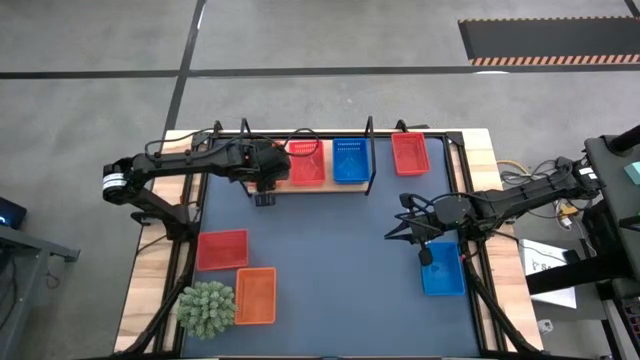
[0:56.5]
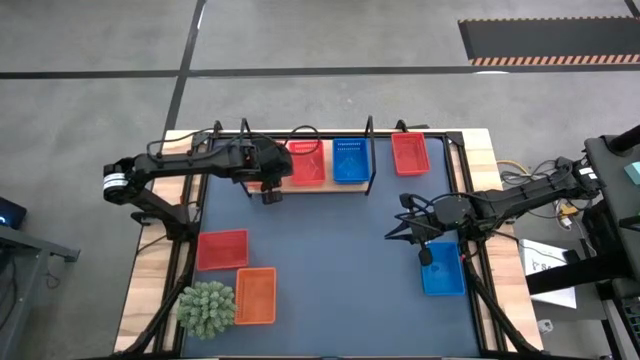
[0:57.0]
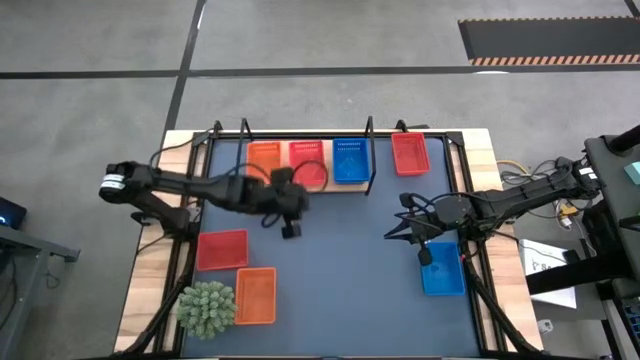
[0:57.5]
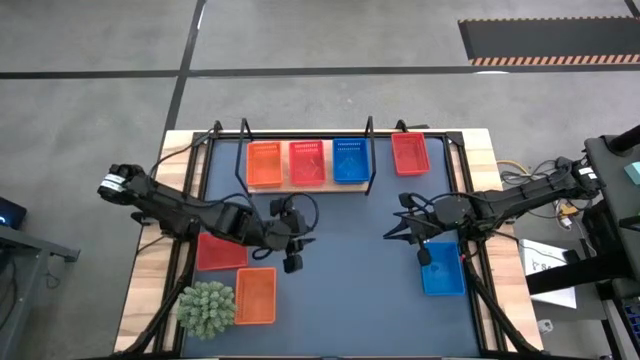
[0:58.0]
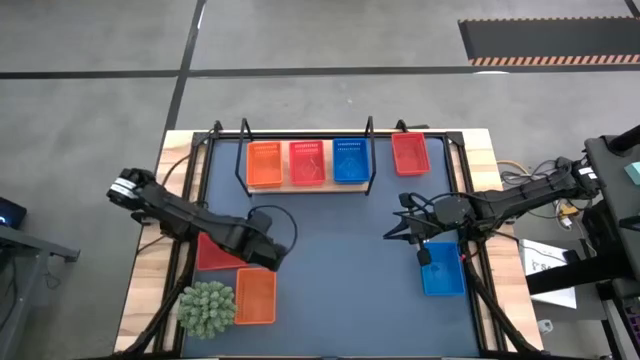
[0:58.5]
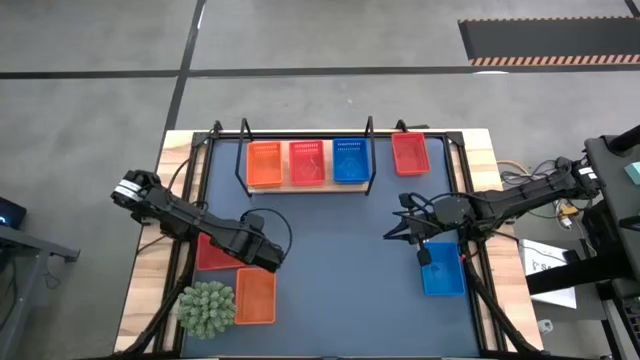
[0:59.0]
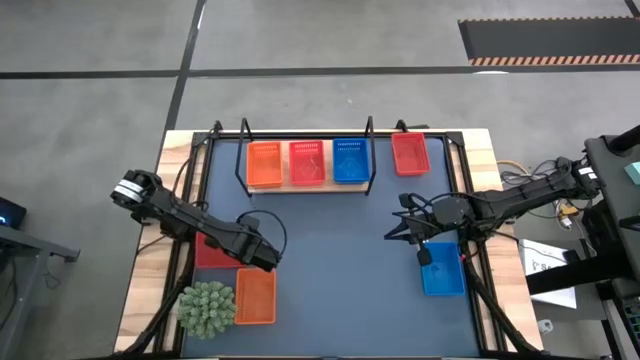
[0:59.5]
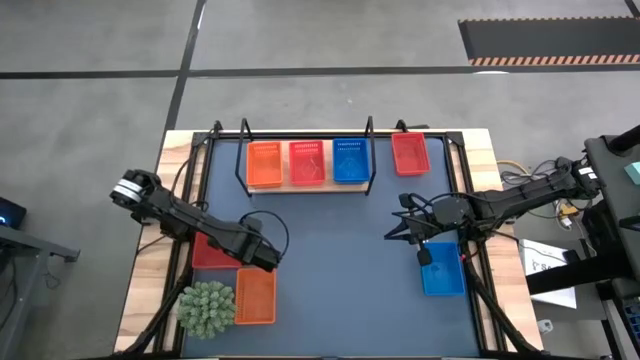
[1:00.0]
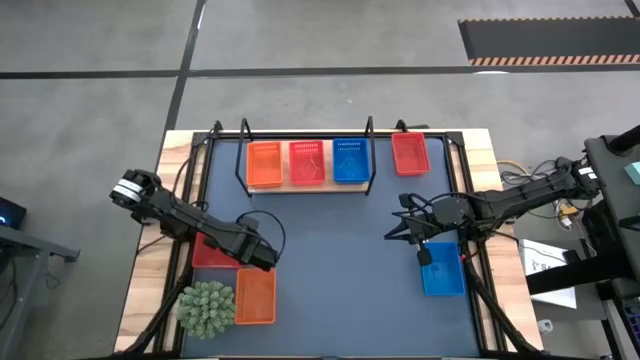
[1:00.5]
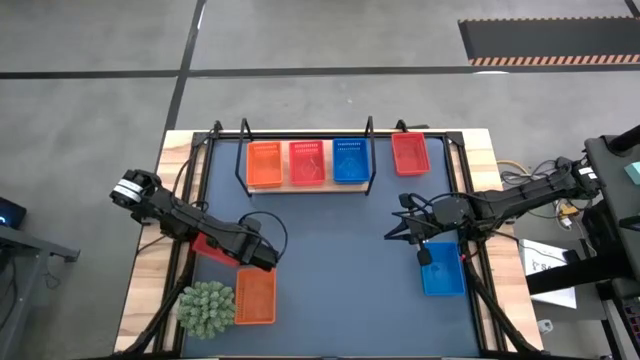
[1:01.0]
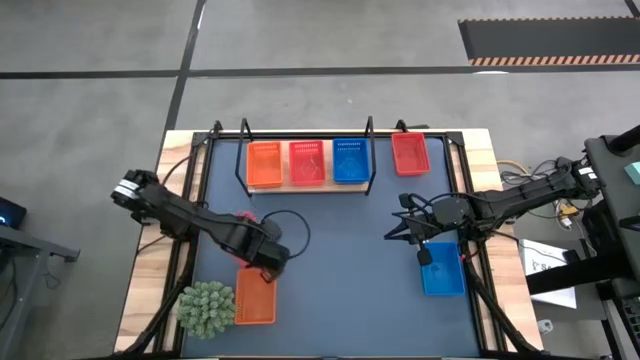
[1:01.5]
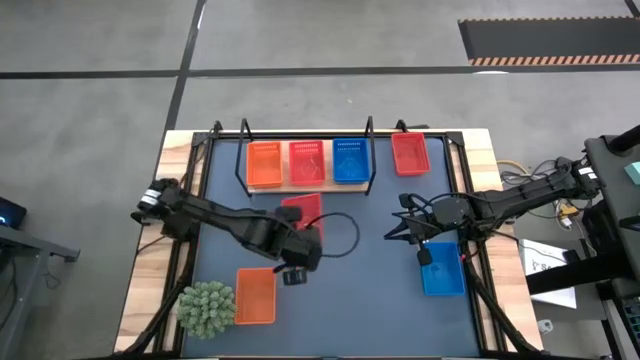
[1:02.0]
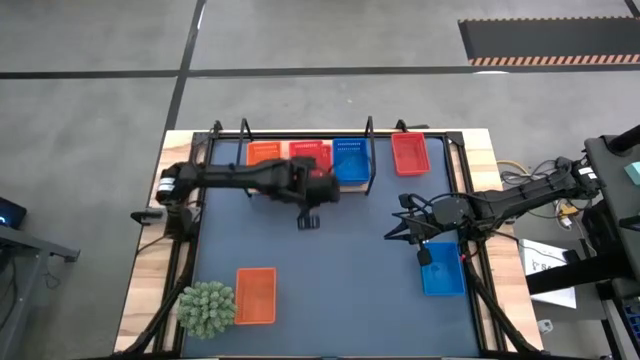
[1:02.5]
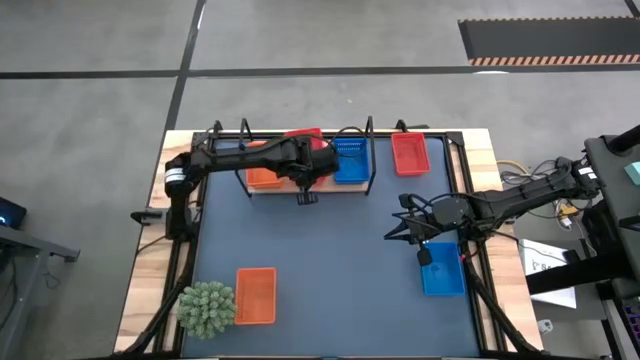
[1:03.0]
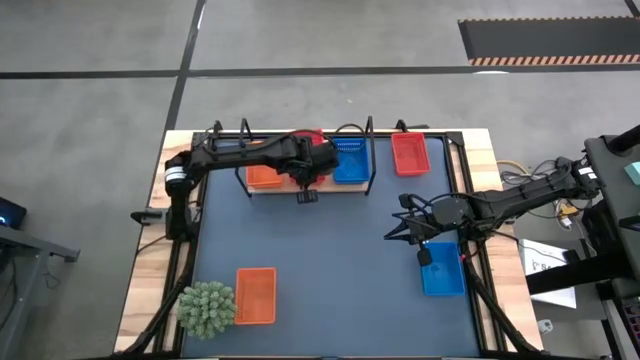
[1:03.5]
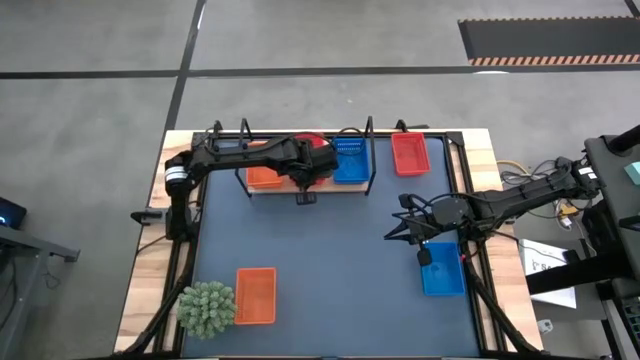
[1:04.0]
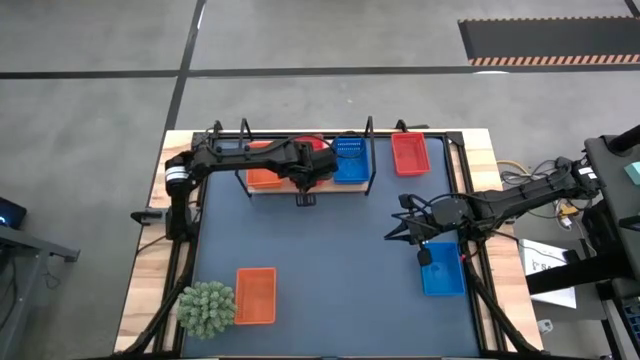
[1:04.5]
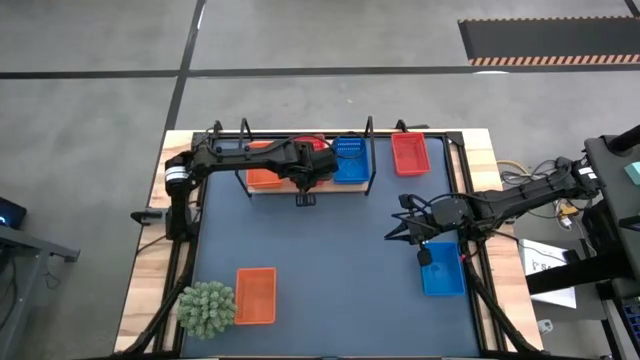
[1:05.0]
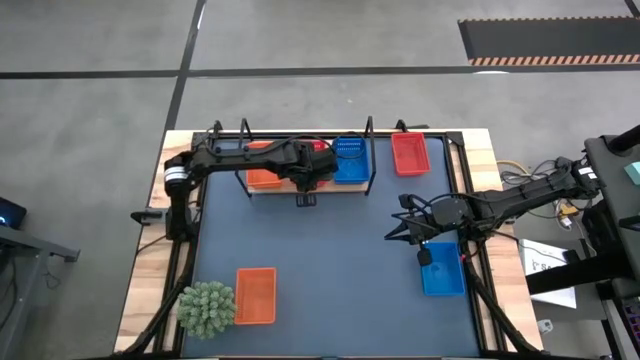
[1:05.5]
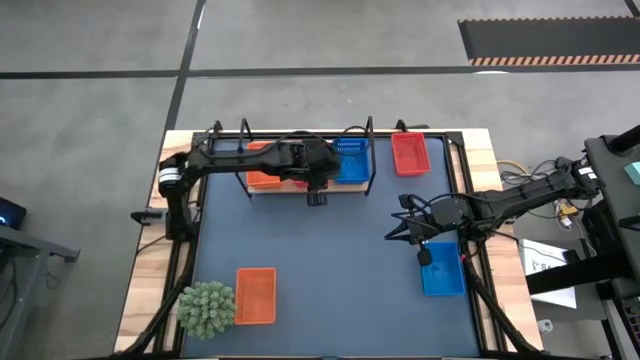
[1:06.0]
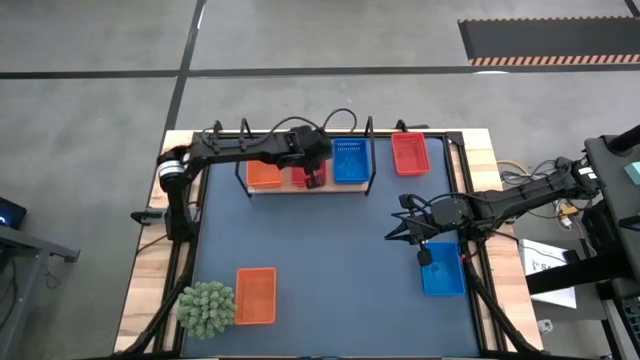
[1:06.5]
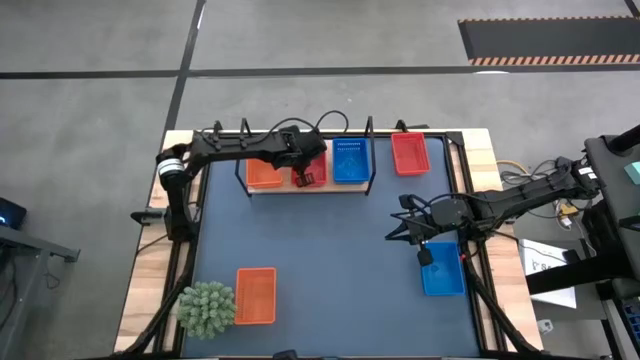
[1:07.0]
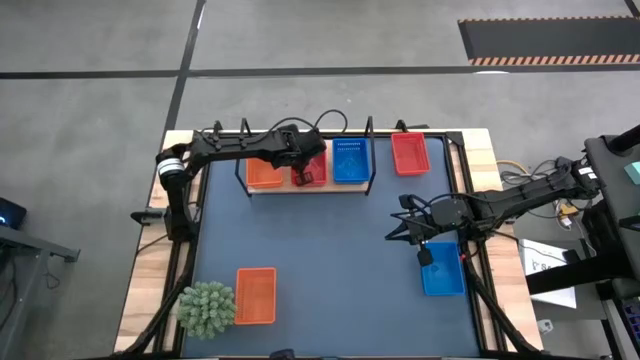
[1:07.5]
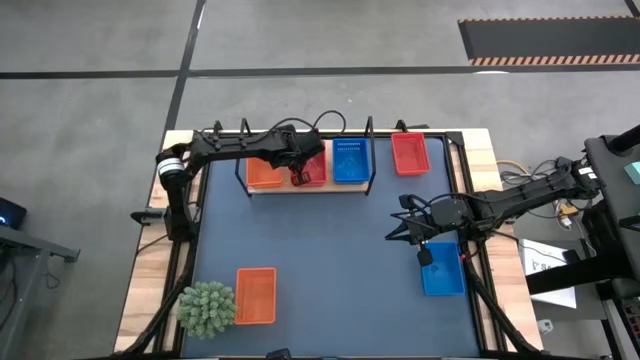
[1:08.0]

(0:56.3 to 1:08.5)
Task: Stack baskets on shelf by color
Stack the bottom red basket on top of the red basket on the shelf

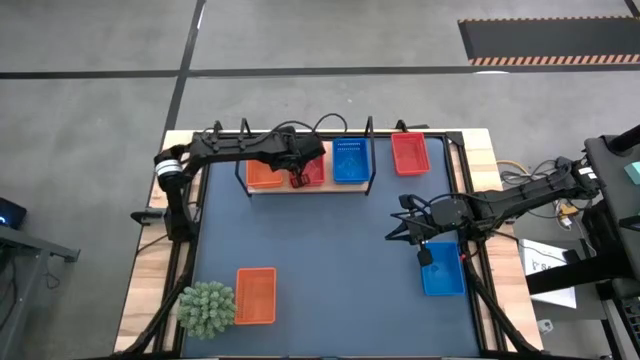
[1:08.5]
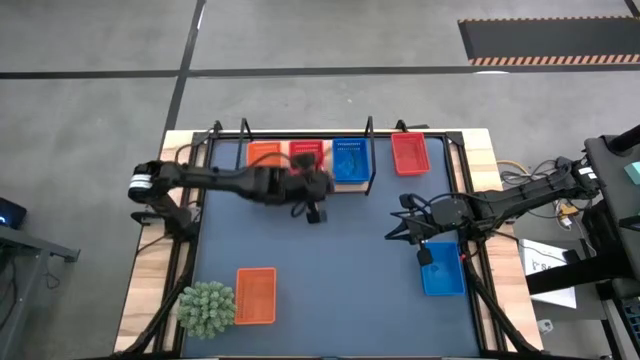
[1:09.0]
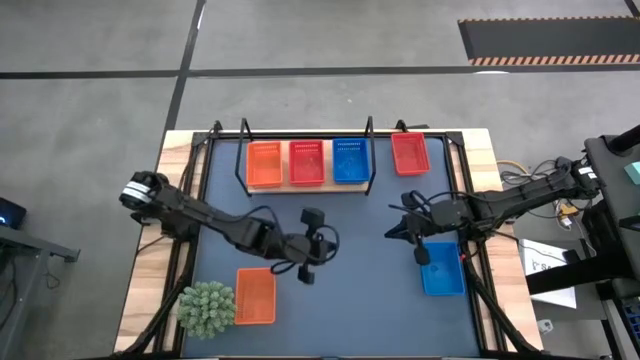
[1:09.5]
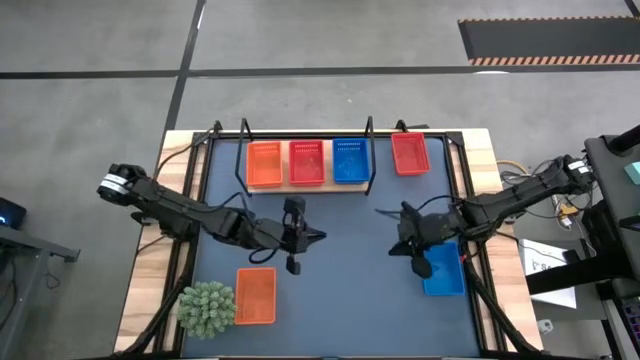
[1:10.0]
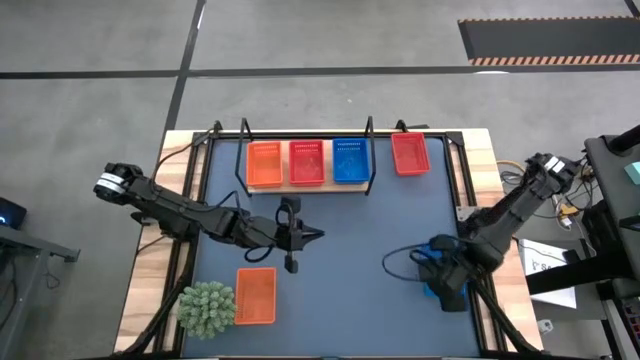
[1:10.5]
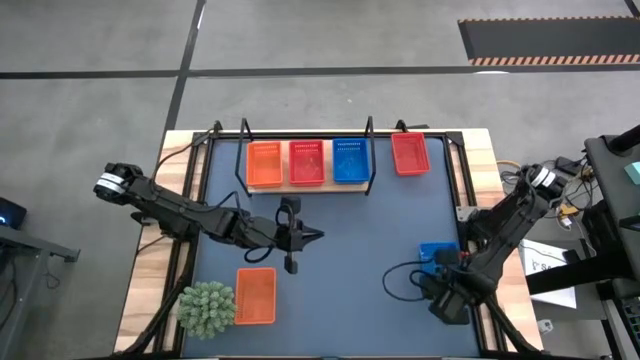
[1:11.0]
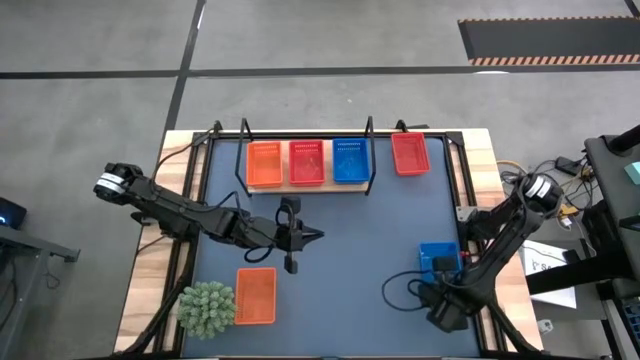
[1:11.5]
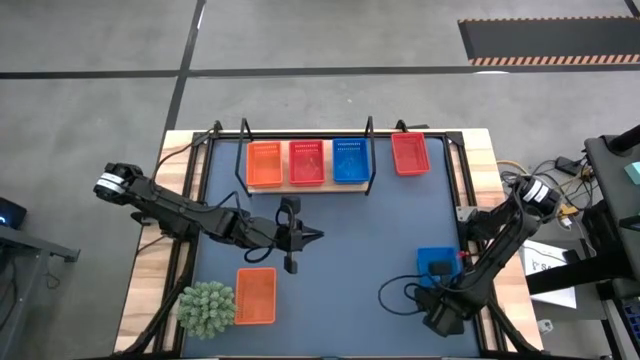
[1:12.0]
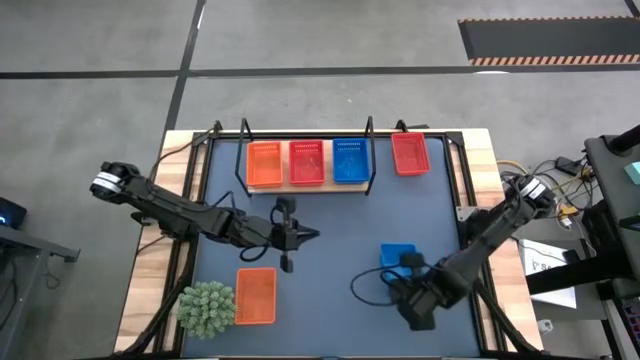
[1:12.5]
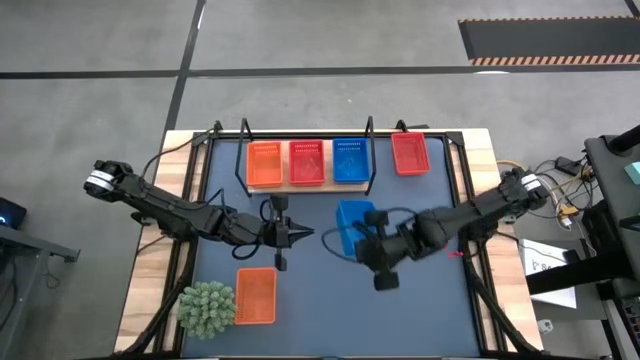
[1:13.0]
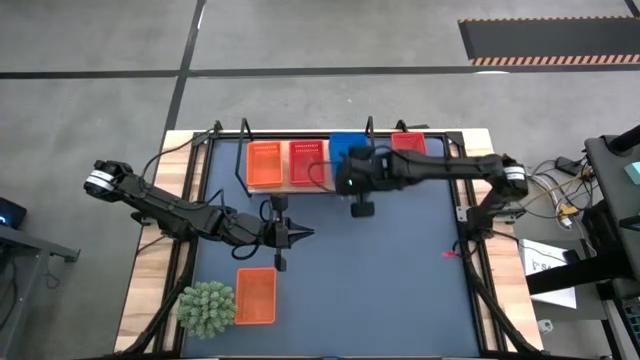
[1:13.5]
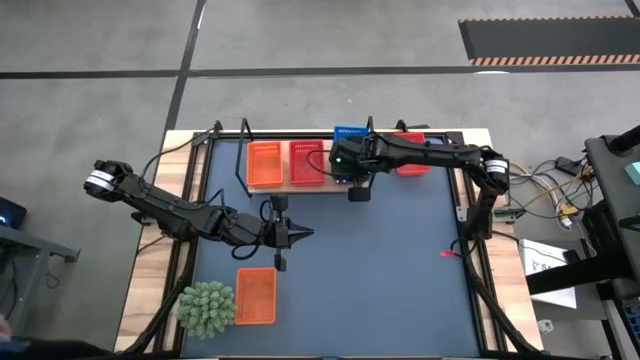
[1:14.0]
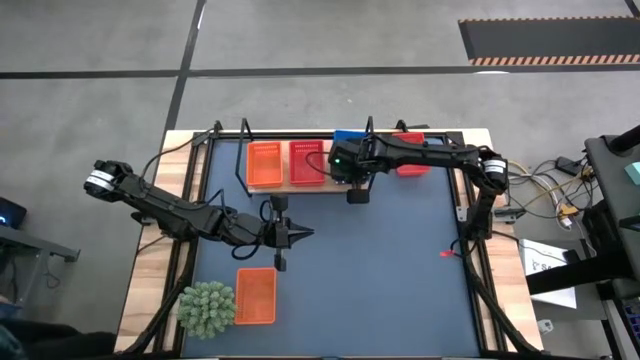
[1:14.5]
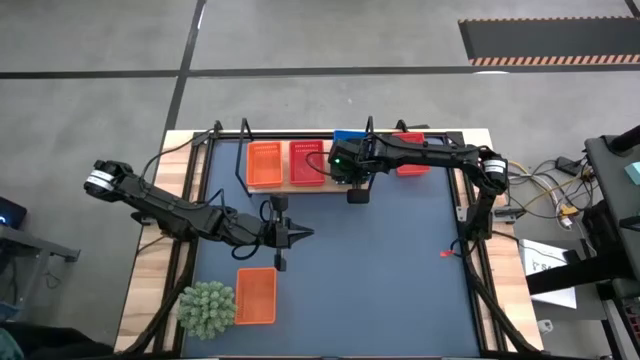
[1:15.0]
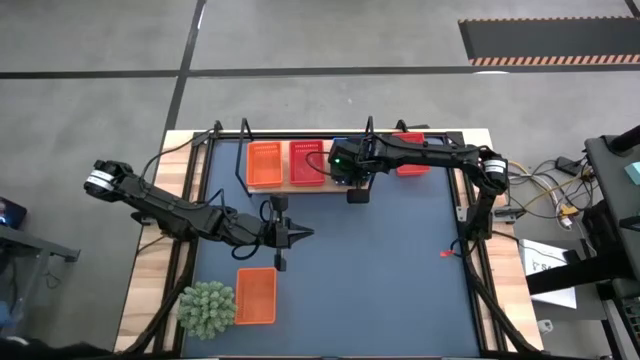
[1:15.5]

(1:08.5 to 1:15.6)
Stack the blue basket on top of the blue baskets on the shelf

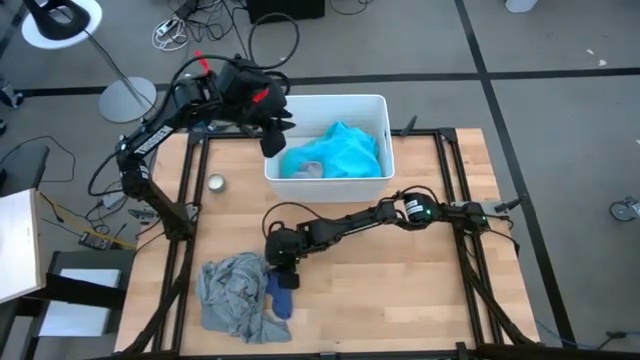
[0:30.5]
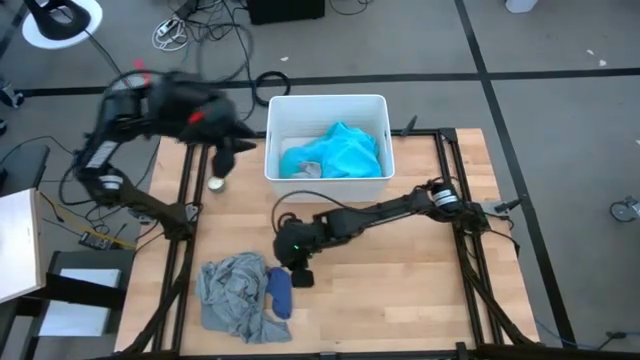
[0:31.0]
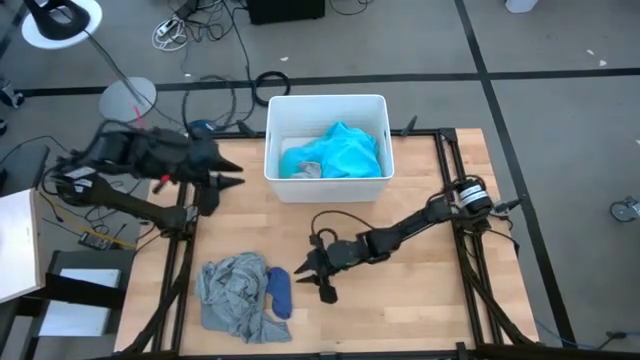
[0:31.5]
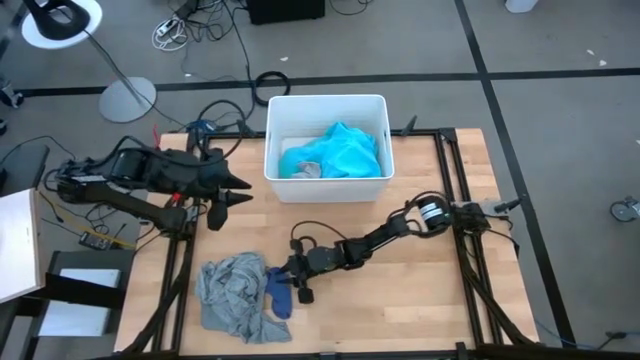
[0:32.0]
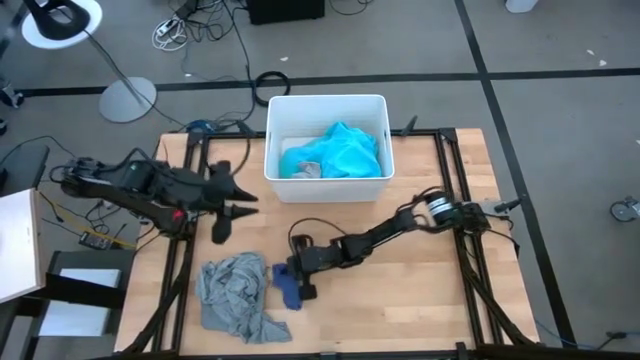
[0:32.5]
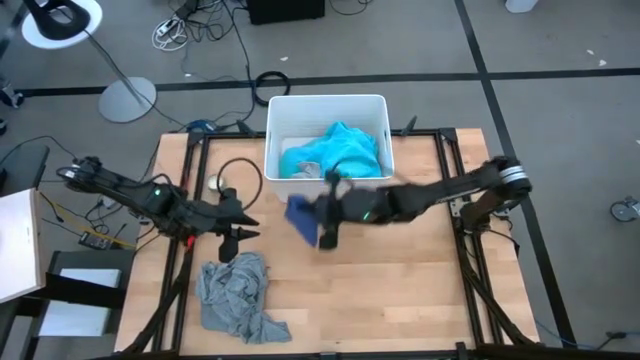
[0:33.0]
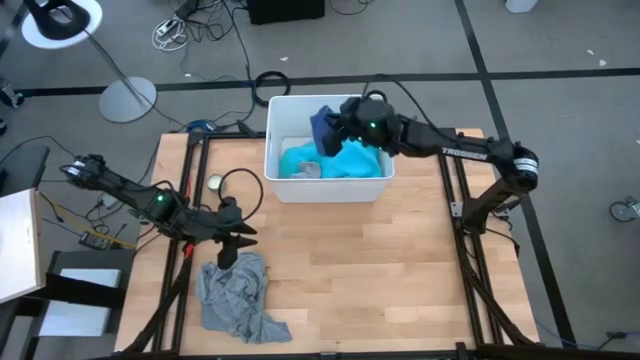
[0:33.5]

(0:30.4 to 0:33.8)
Task: Sort clothes
Put the purple sock into the white laundry bin
